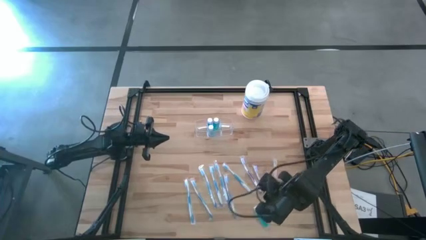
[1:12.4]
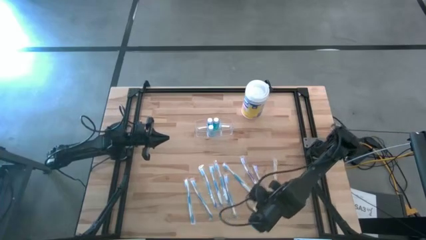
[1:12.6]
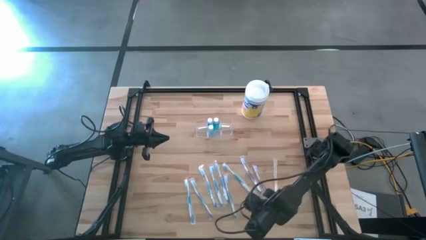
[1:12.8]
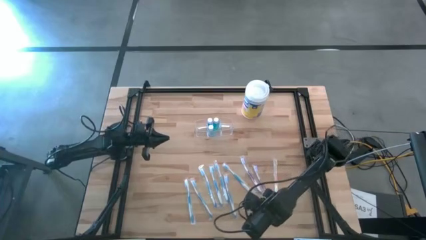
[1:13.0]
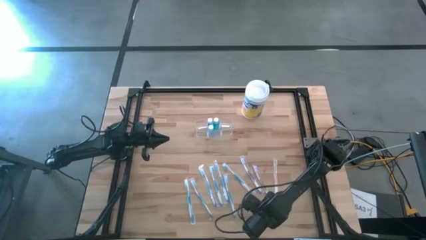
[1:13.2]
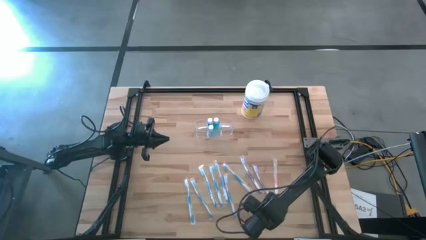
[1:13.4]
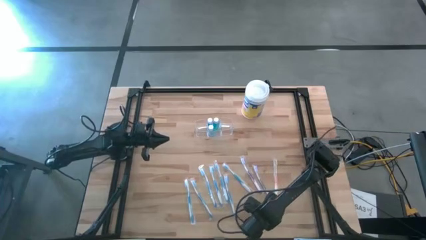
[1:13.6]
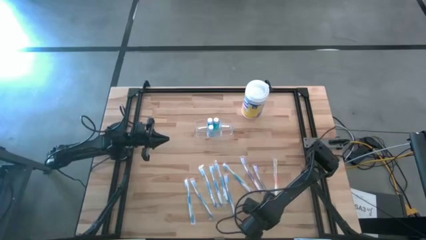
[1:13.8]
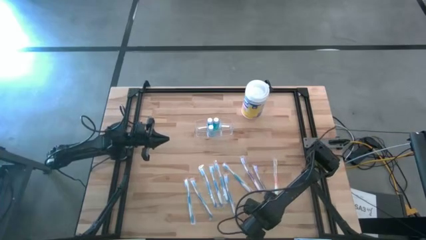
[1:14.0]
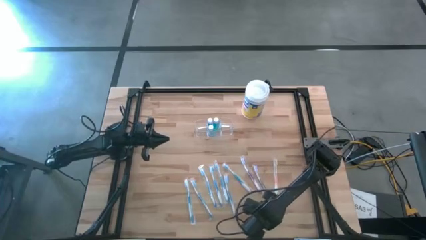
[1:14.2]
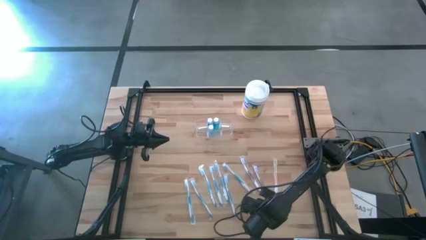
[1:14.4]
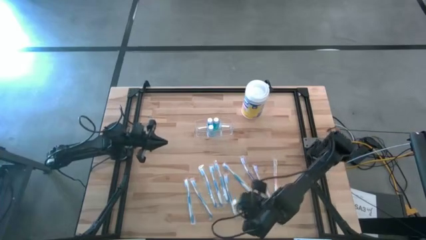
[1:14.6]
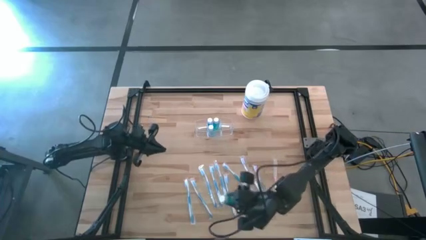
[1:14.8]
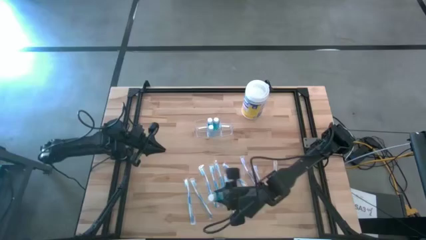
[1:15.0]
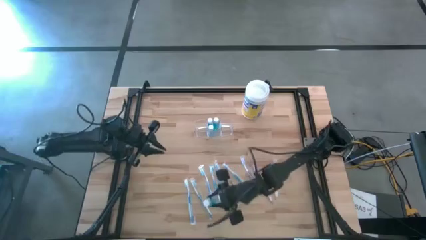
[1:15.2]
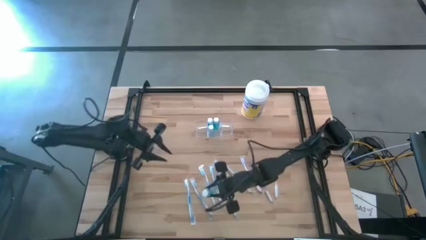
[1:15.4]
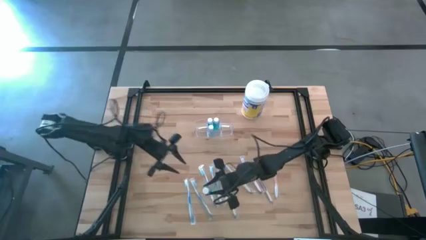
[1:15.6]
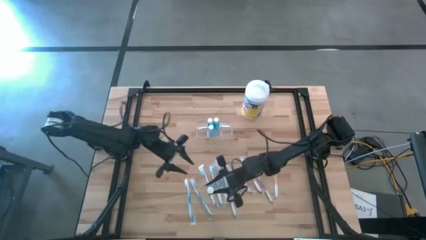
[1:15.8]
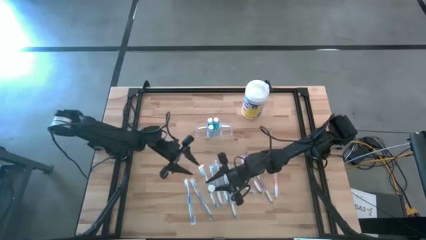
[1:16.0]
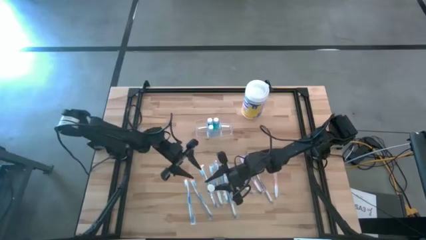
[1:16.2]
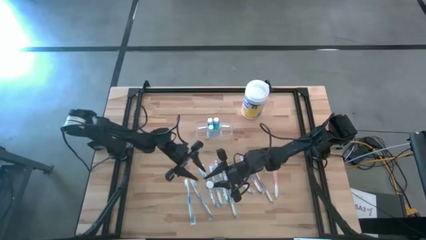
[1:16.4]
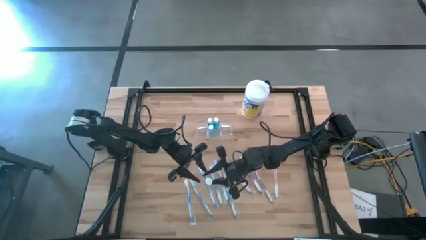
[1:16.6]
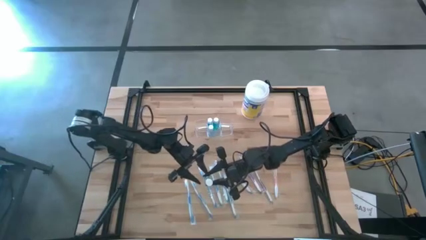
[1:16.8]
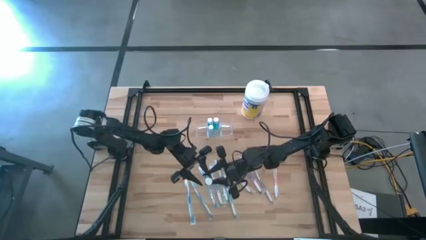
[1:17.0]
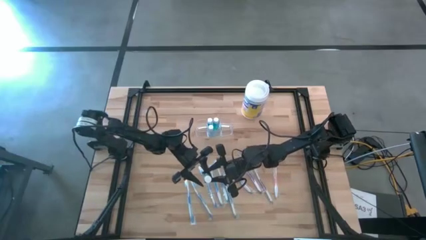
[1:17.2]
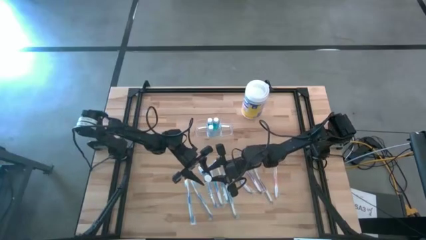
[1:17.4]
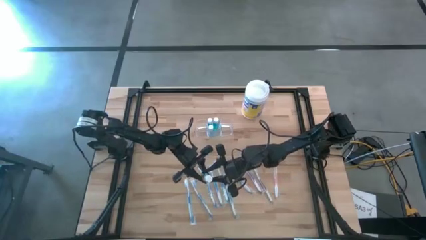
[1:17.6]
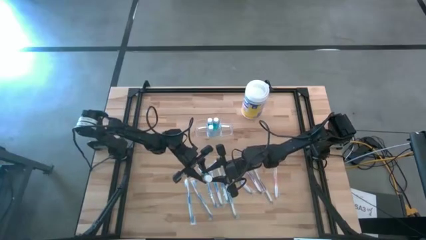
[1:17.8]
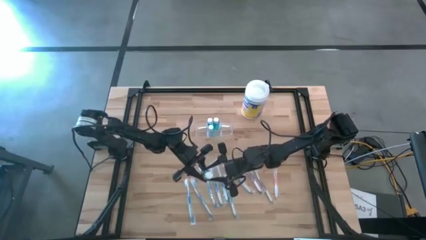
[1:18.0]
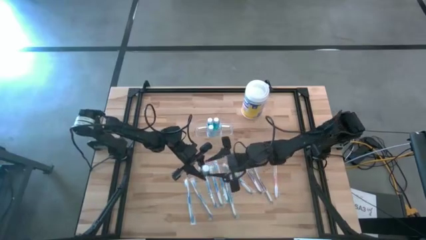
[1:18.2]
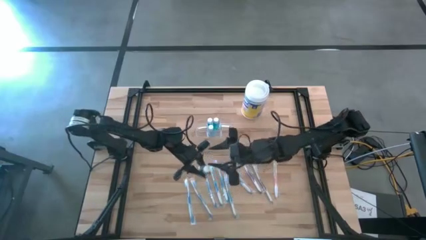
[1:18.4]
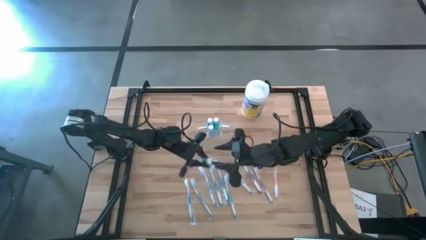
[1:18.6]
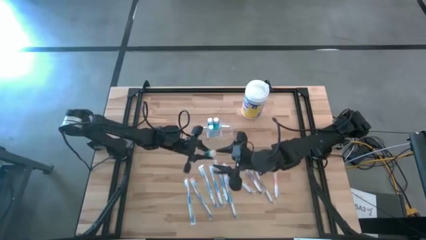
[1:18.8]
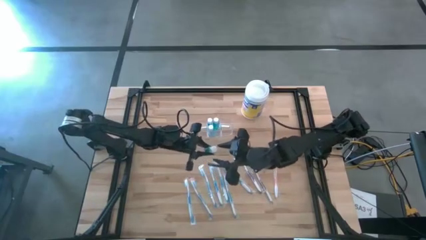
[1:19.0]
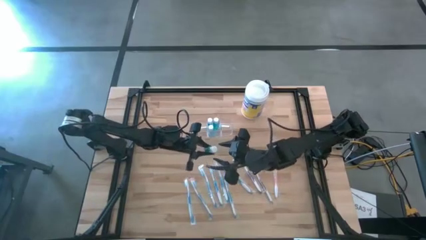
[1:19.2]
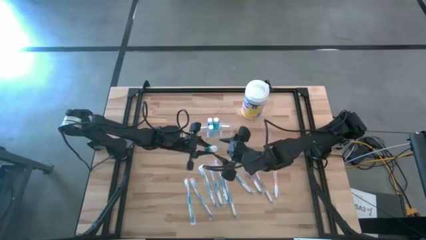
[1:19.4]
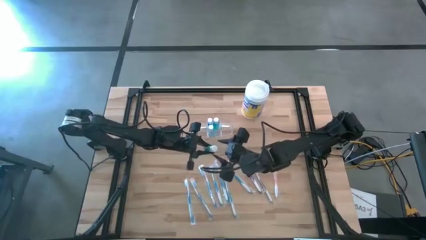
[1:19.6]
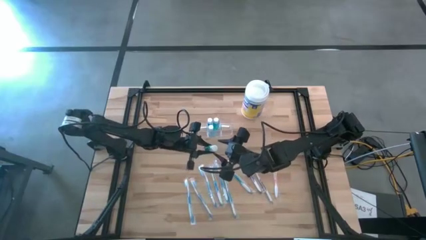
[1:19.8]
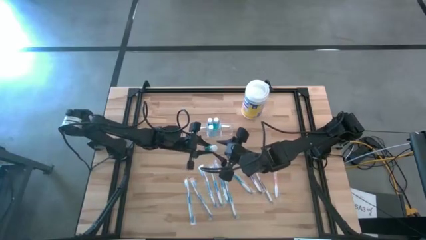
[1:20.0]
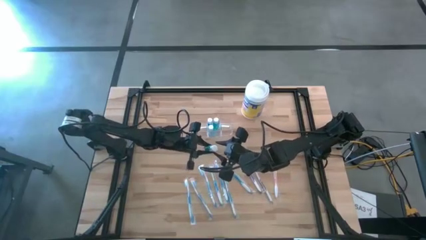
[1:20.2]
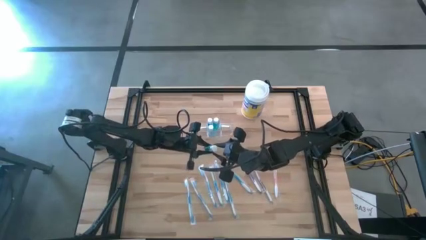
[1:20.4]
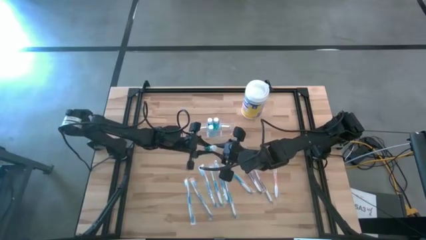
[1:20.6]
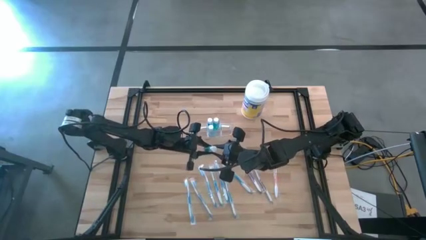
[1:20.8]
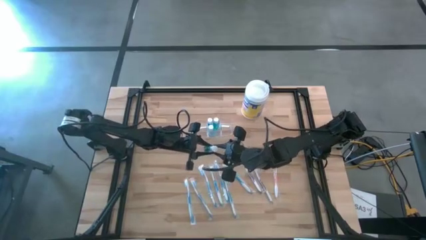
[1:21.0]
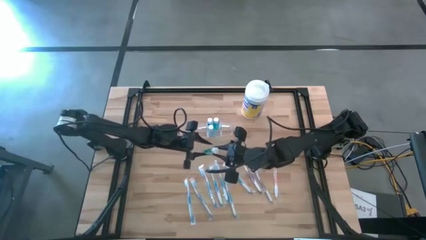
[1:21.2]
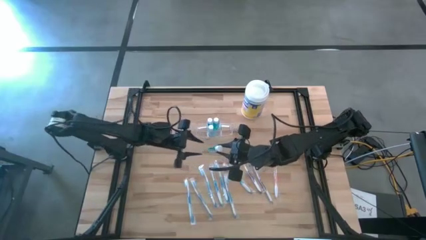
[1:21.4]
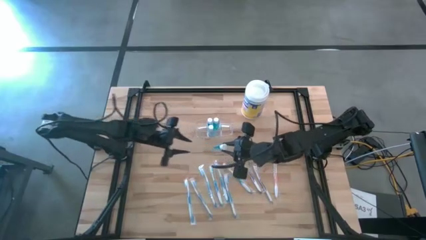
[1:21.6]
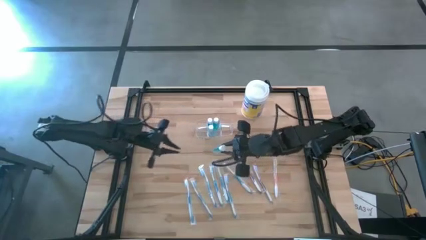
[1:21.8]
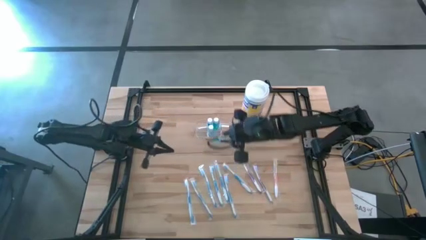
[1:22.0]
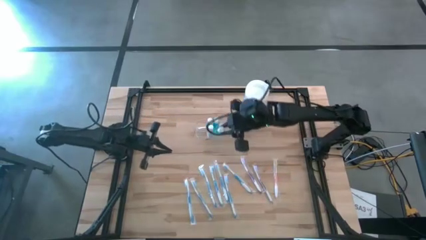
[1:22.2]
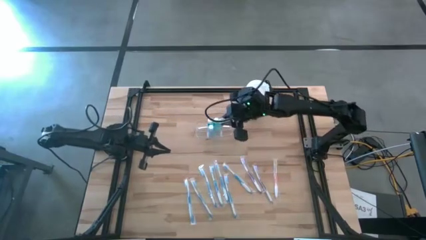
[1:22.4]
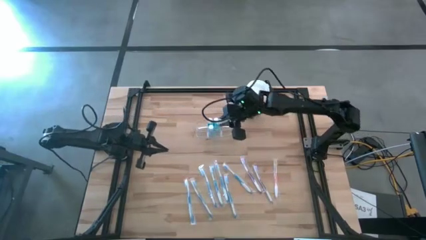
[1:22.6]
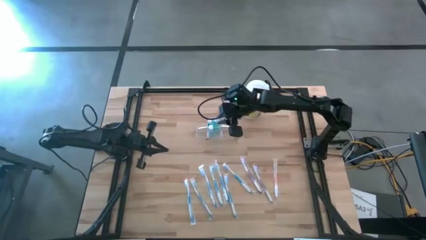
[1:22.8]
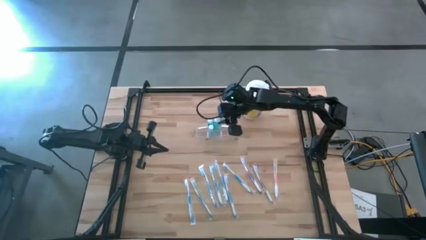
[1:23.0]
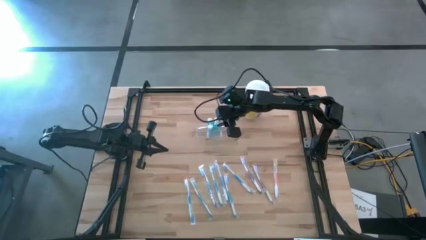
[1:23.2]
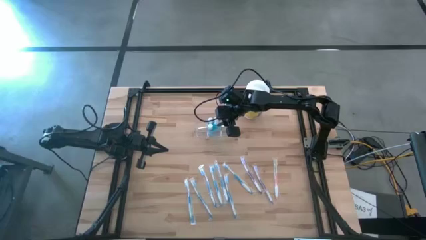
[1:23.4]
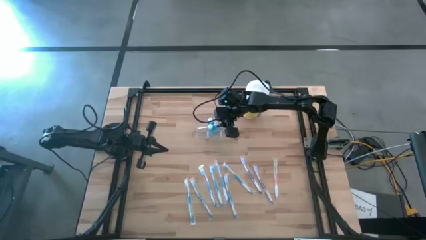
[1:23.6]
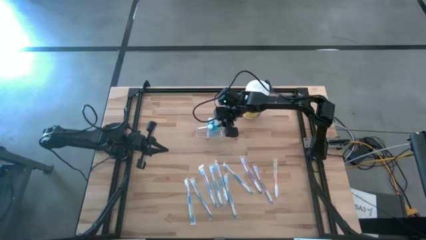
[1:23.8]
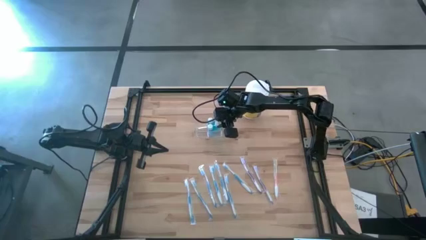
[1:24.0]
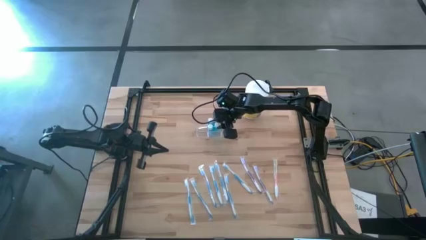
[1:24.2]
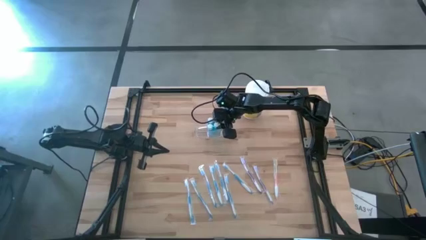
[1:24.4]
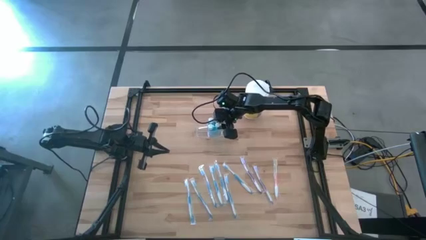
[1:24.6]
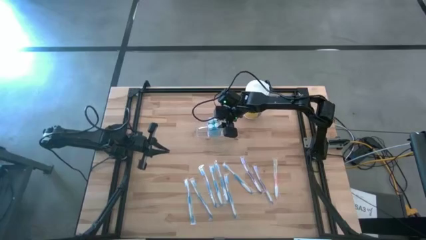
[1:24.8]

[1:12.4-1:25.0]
Task: Pick & Place toothbrushing station
Put the blue mouthwash bottle into the transparent organizer

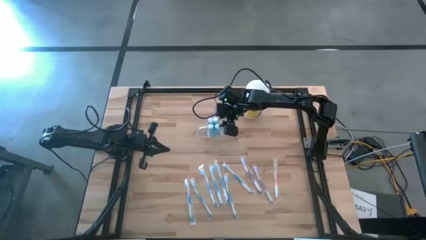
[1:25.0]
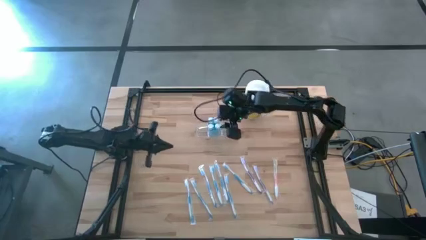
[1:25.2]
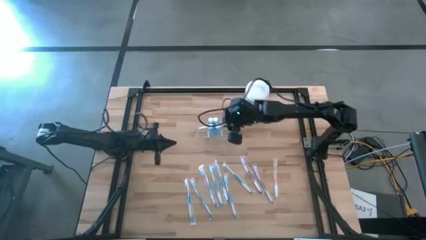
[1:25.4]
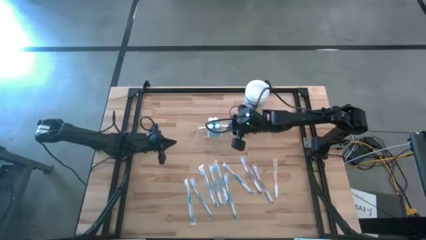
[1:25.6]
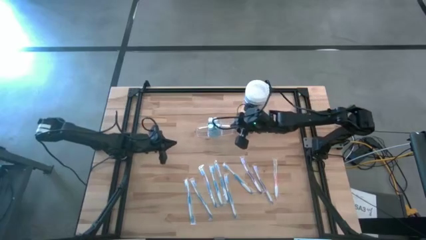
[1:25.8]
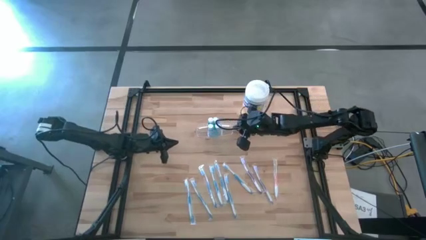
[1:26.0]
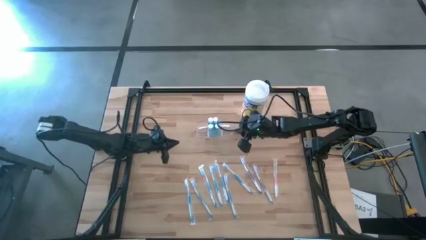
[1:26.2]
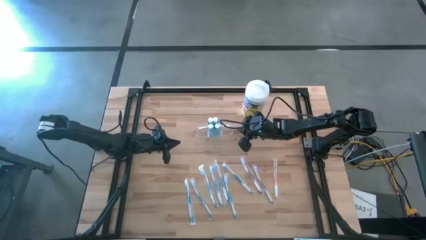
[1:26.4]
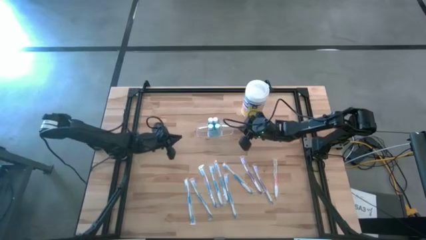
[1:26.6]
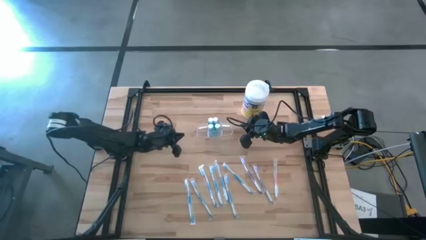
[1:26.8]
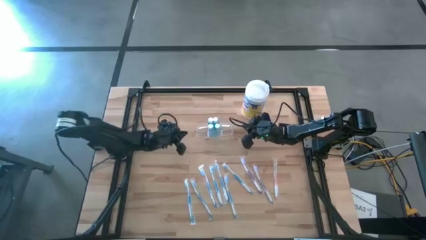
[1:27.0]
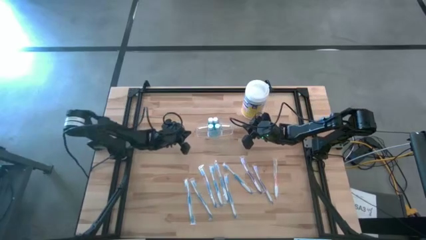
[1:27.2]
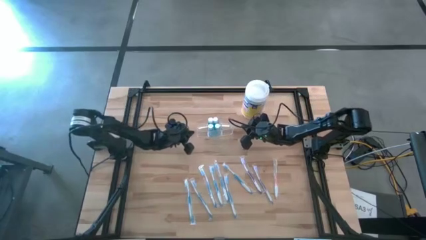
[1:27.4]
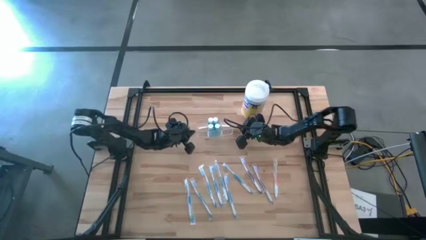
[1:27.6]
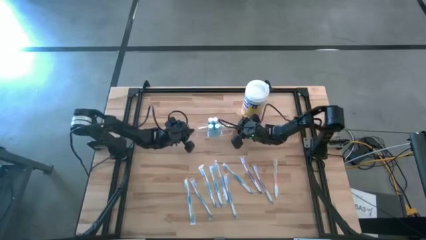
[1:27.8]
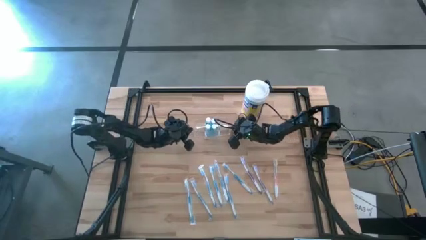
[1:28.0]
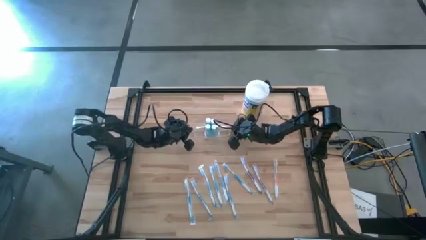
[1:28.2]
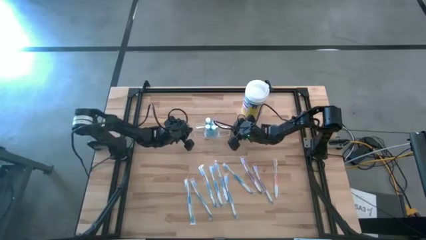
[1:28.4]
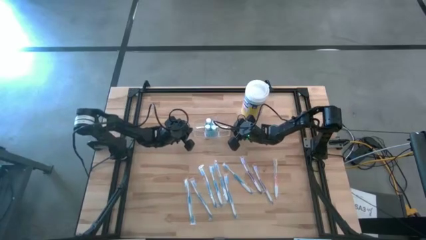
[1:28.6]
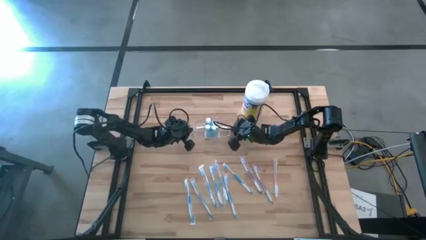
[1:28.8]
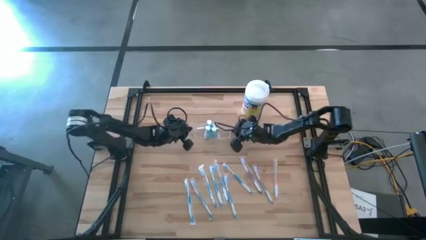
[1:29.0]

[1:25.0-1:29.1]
Adjust the transparent organizer
